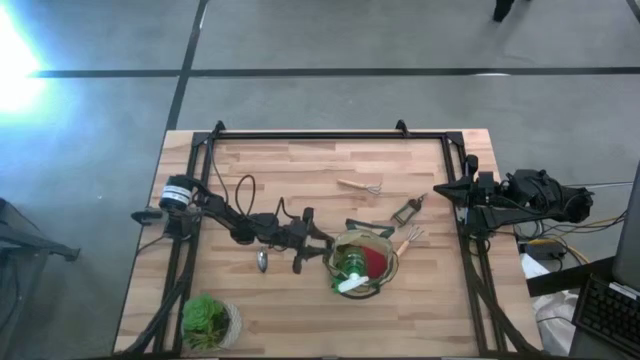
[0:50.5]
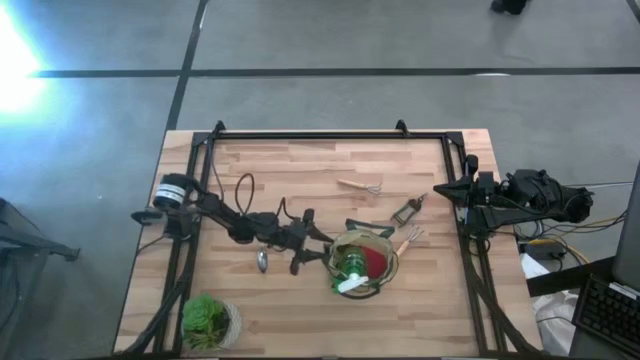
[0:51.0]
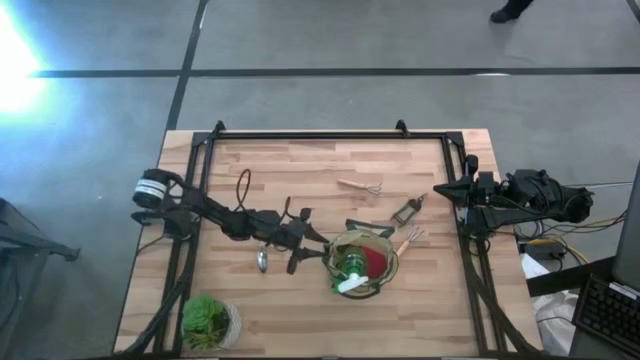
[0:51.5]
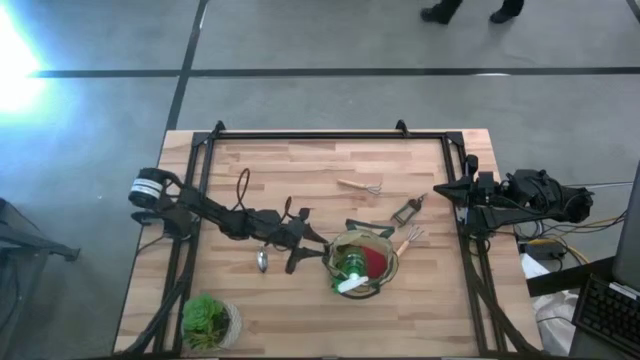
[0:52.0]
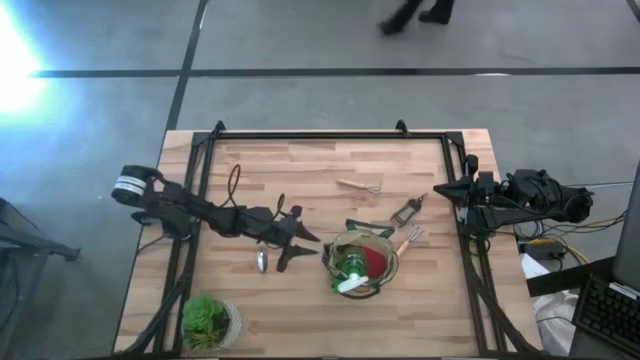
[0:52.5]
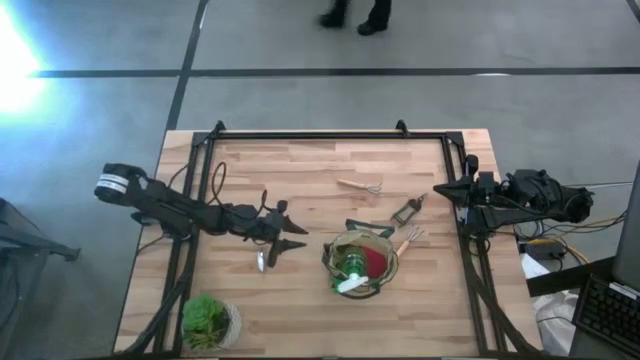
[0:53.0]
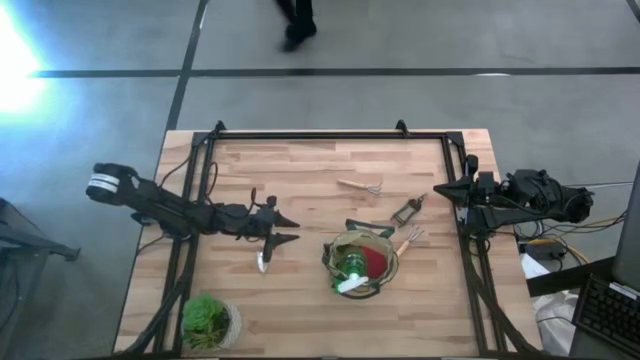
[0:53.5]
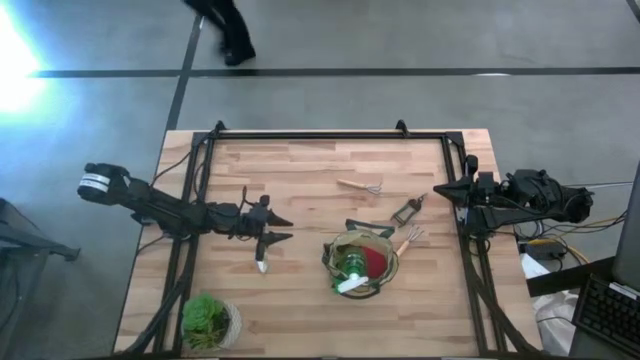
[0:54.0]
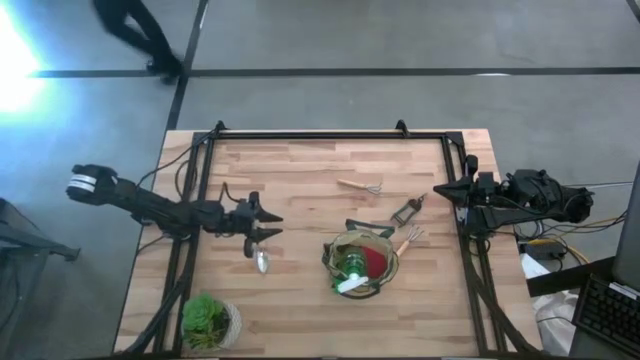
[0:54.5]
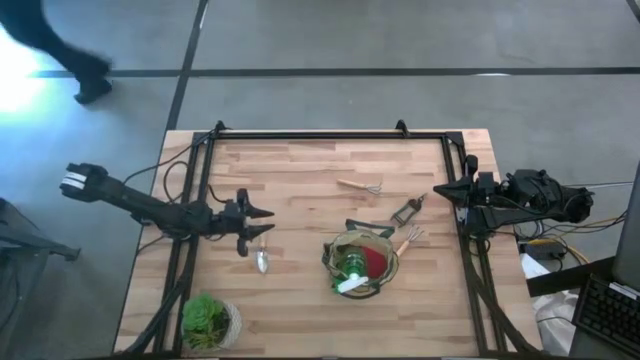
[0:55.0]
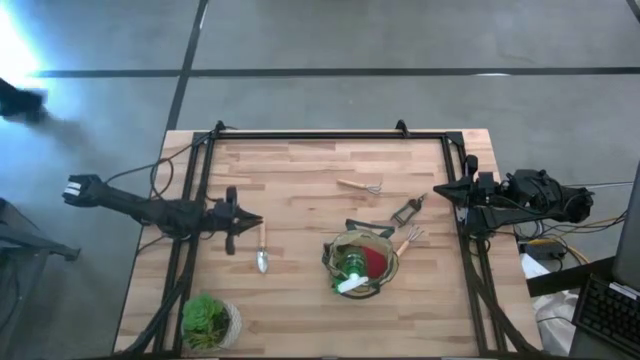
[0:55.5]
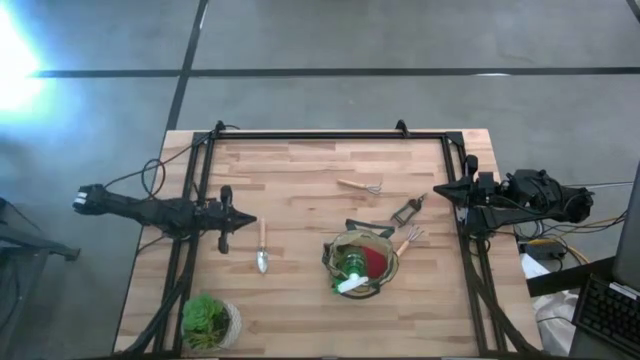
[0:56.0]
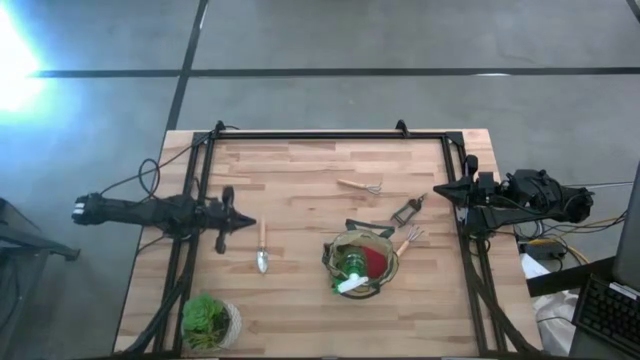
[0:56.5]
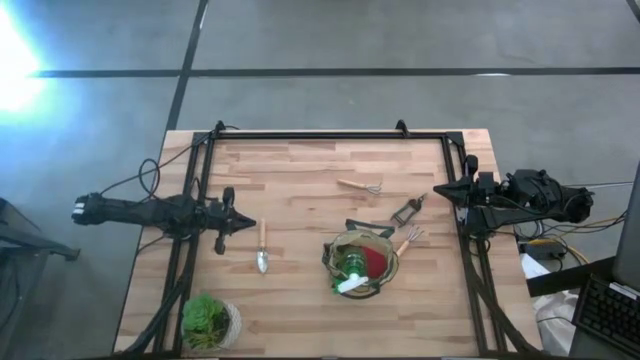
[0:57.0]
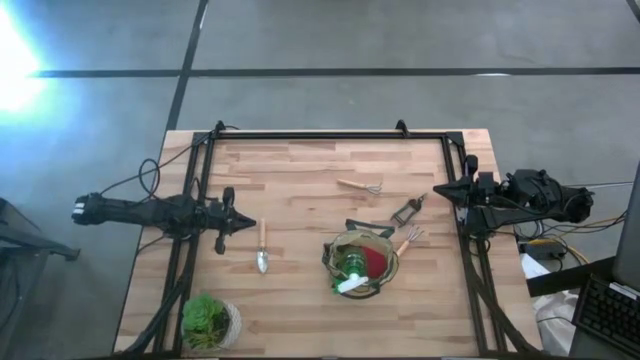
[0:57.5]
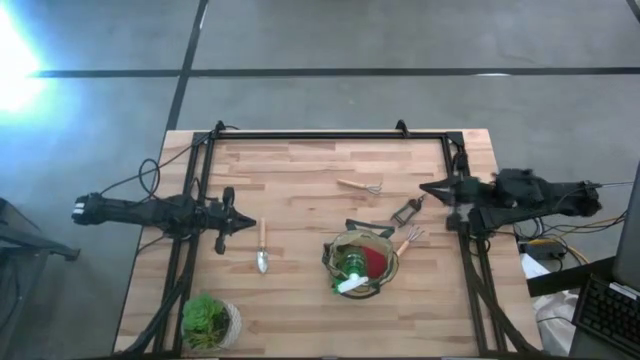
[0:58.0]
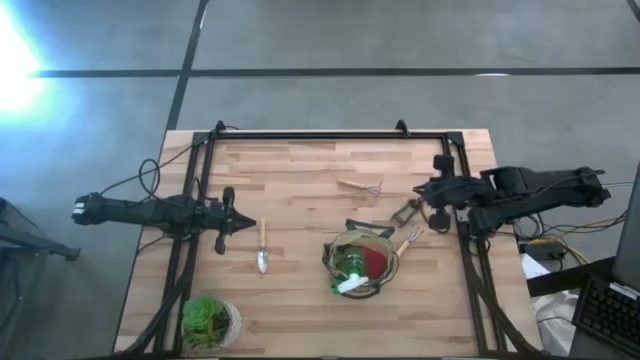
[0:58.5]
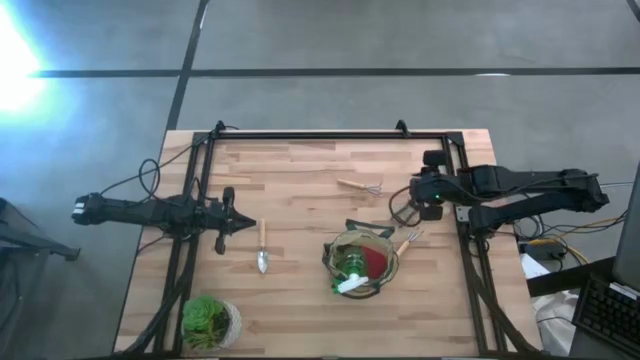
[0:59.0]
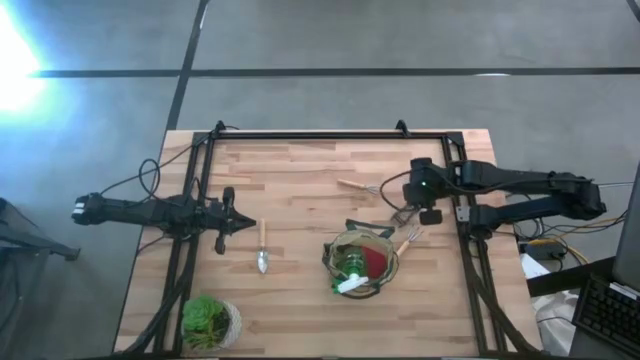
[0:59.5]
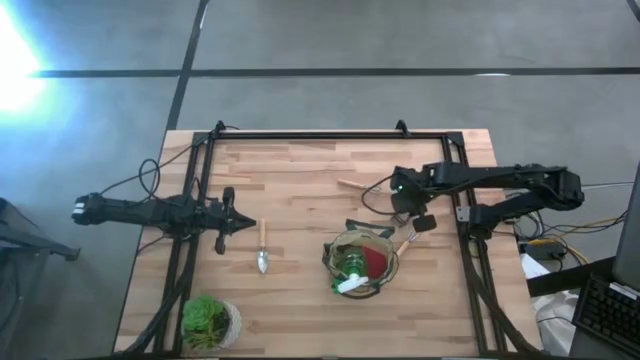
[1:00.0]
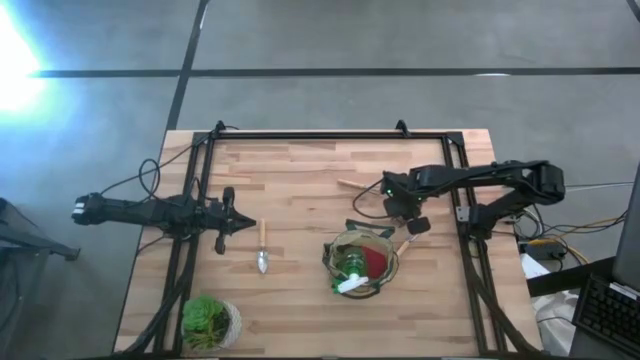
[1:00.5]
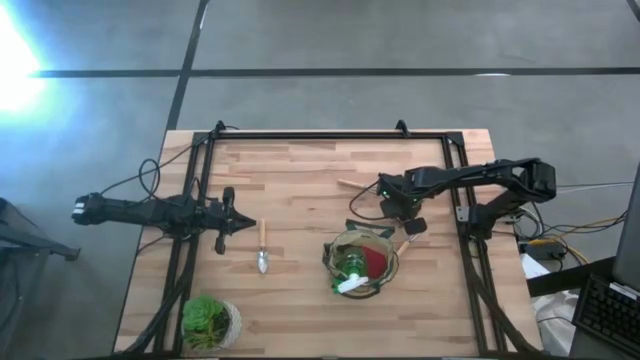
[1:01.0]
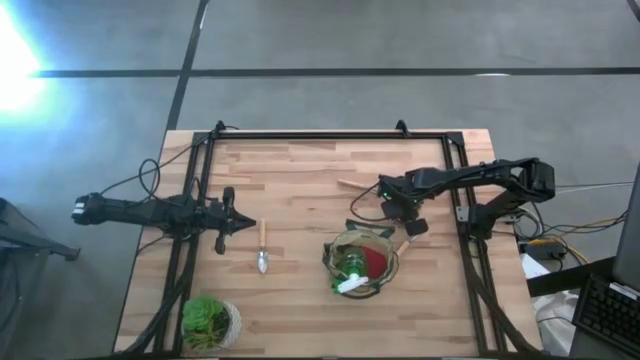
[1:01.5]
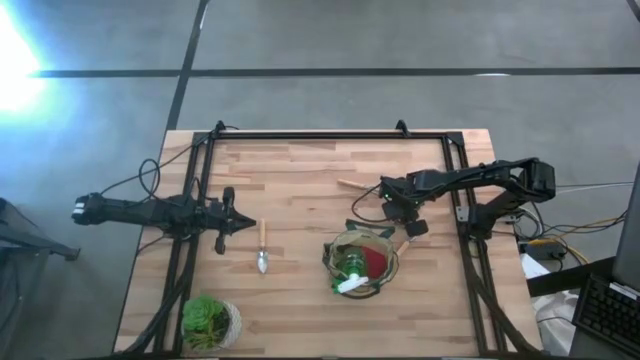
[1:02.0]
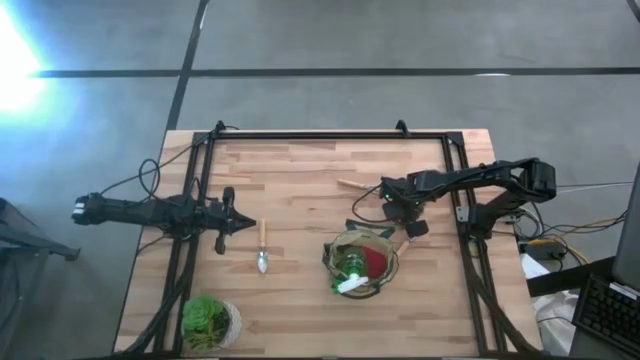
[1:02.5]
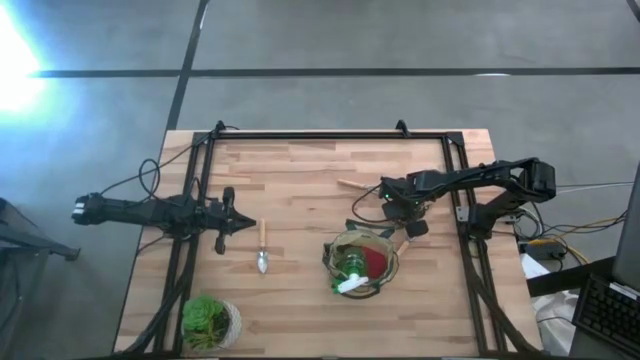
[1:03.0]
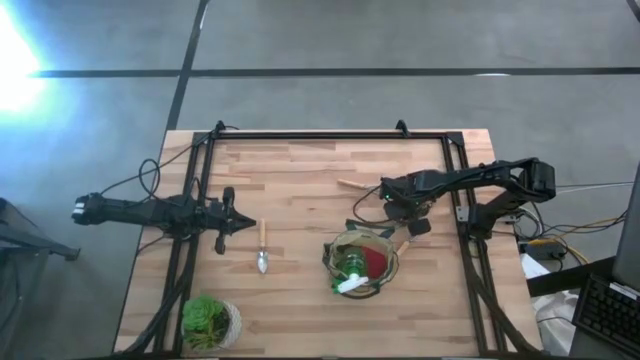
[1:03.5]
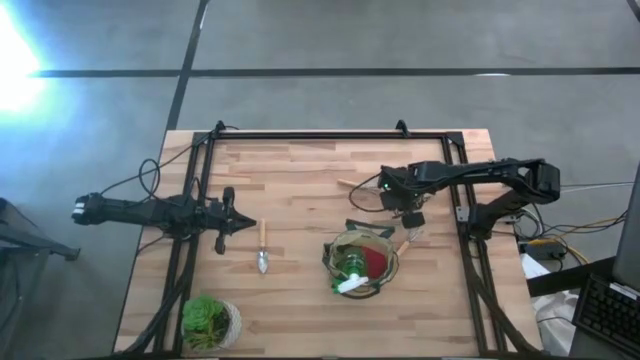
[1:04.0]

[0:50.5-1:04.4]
Task: Pick & Place Garden tools in Gardening bag
Put the shear scissors into the side pocket of the gardening bag
